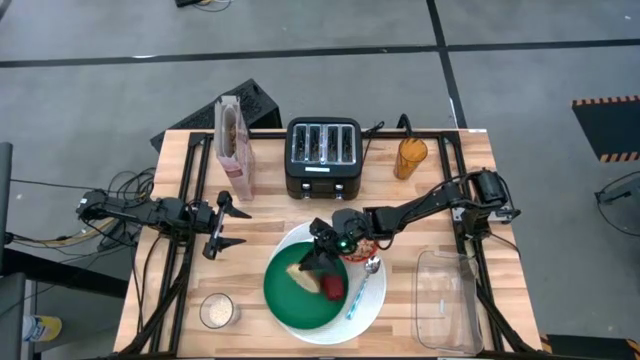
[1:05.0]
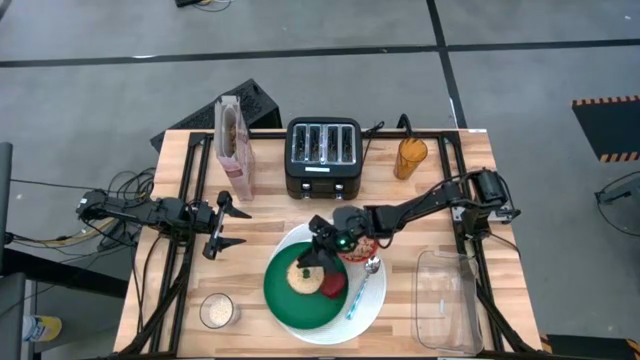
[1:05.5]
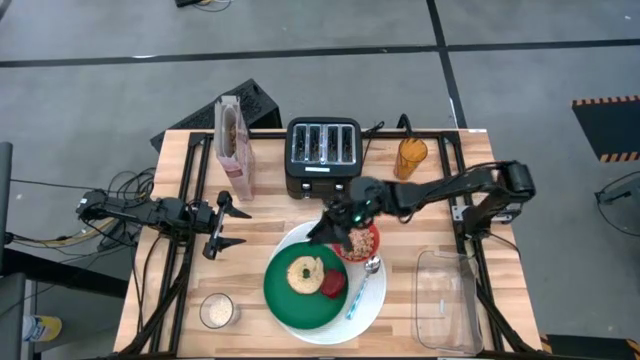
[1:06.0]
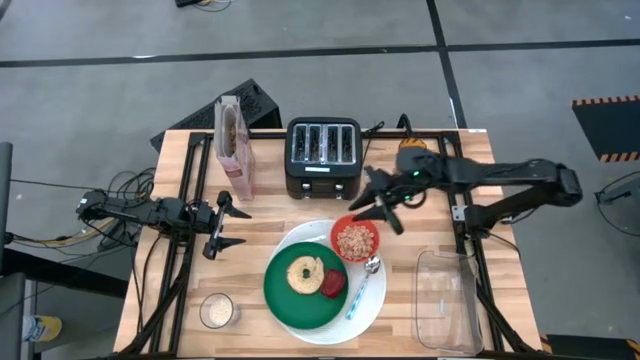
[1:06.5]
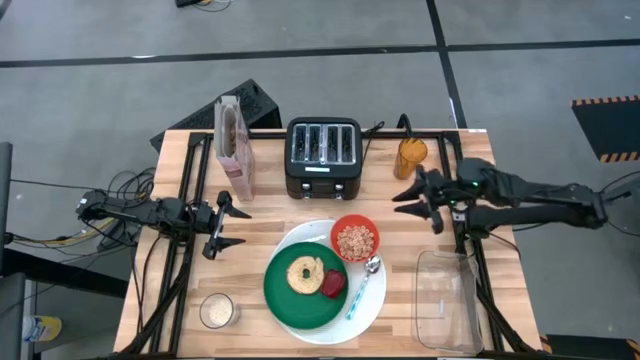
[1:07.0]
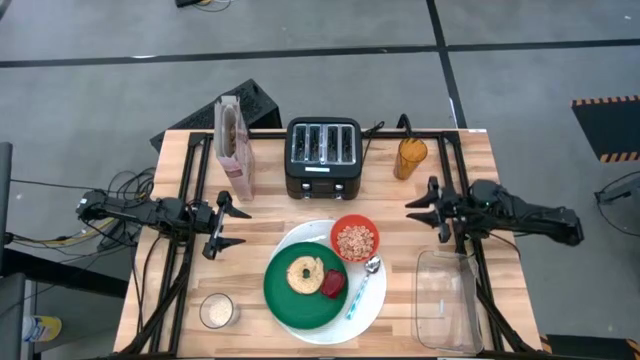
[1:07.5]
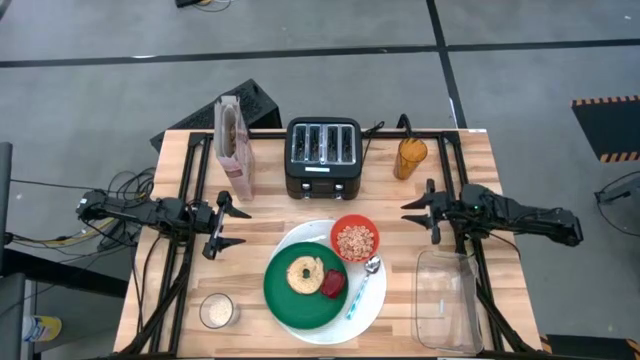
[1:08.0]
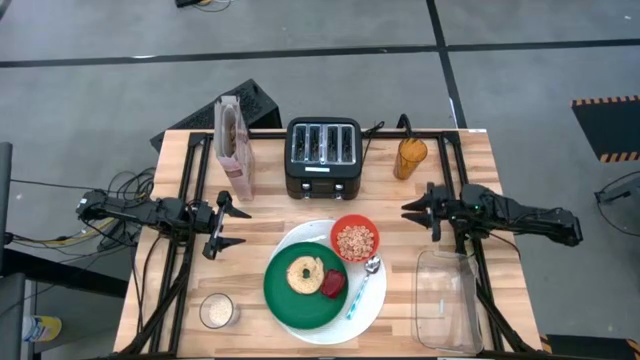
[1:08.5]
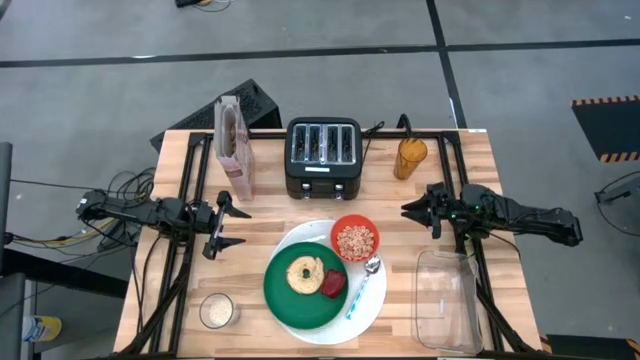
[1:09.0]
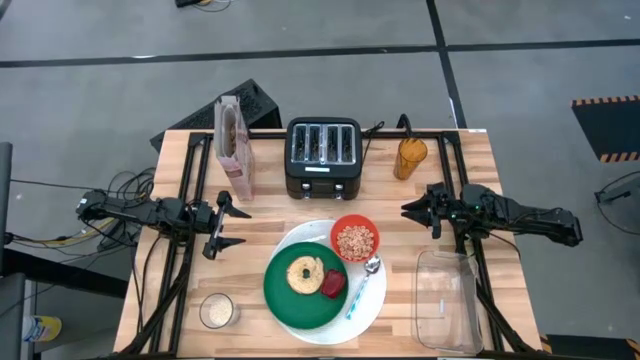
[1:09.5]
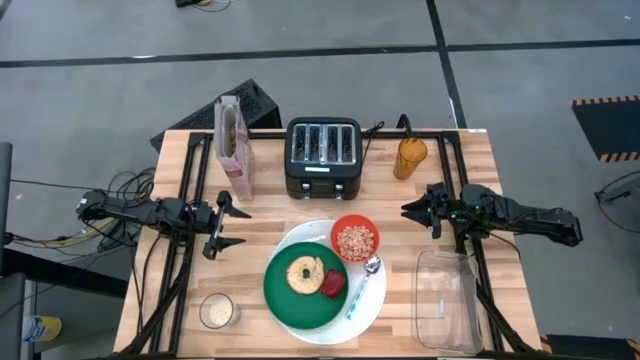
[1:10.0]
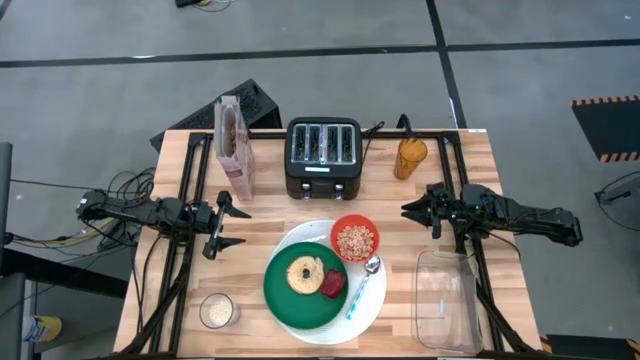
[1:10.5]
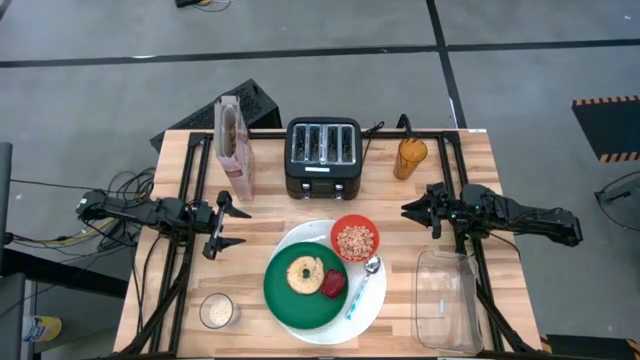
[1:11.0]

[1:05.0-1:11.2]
Task: Arrange a breakfast setting
Return to Home Position

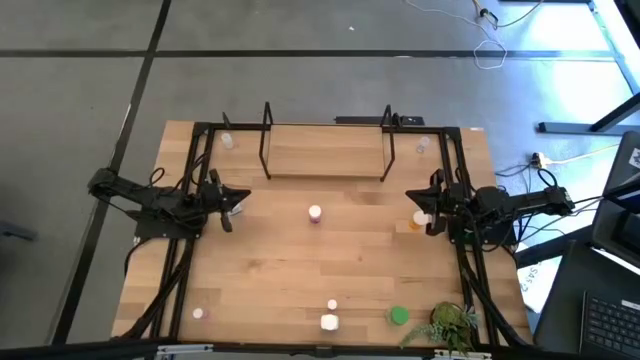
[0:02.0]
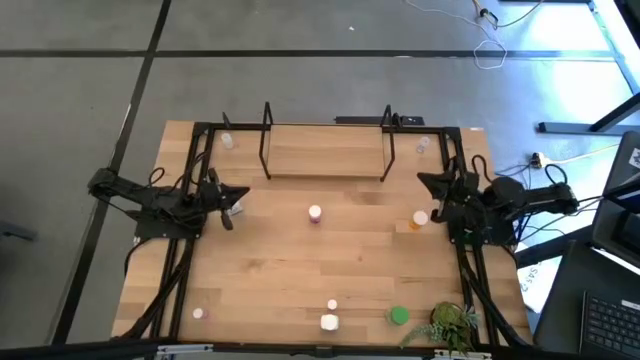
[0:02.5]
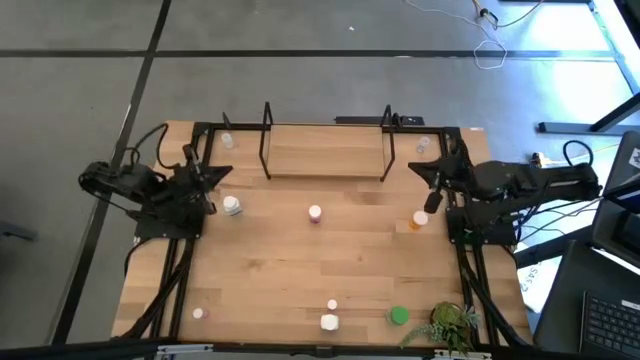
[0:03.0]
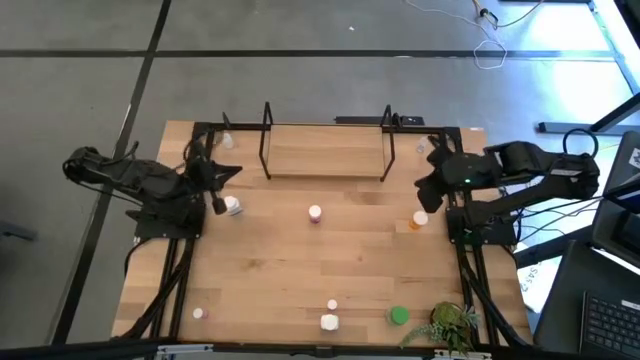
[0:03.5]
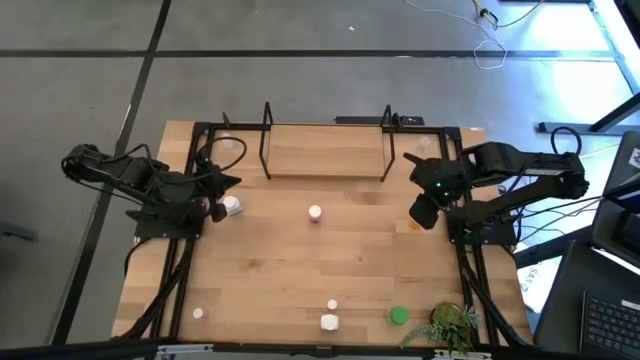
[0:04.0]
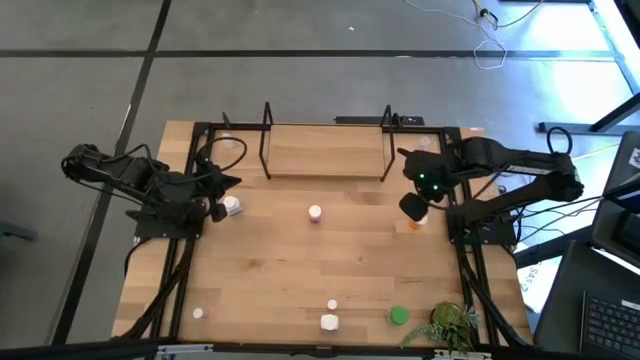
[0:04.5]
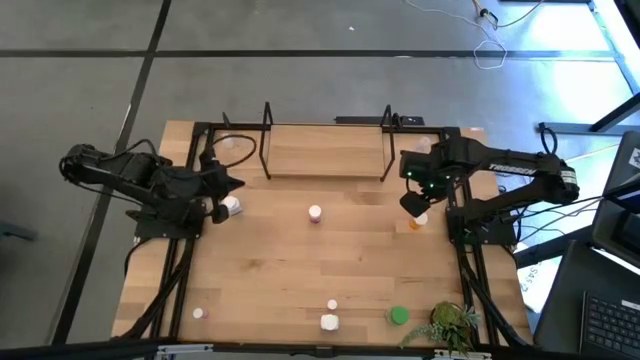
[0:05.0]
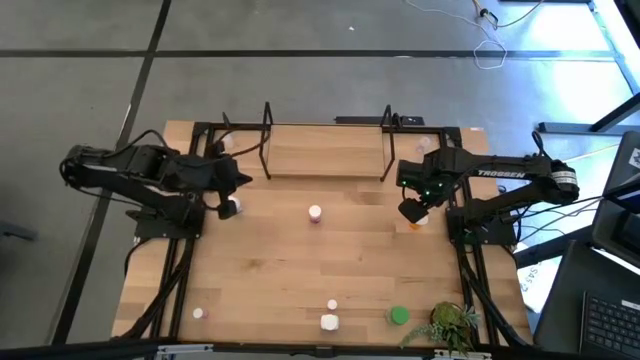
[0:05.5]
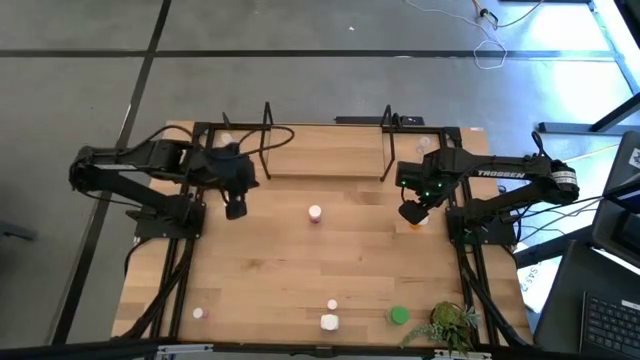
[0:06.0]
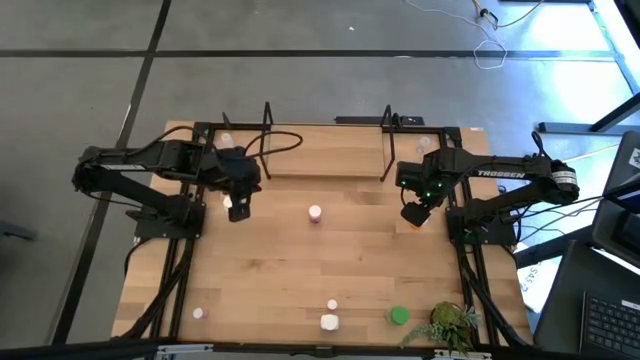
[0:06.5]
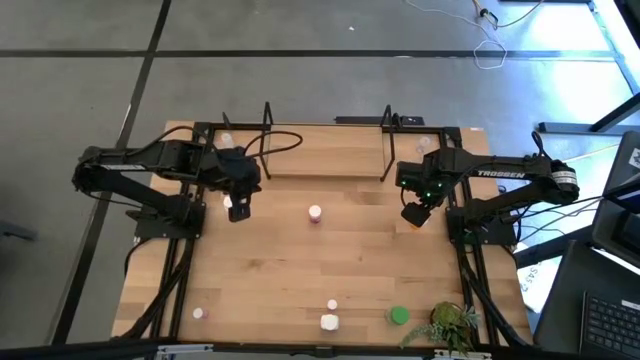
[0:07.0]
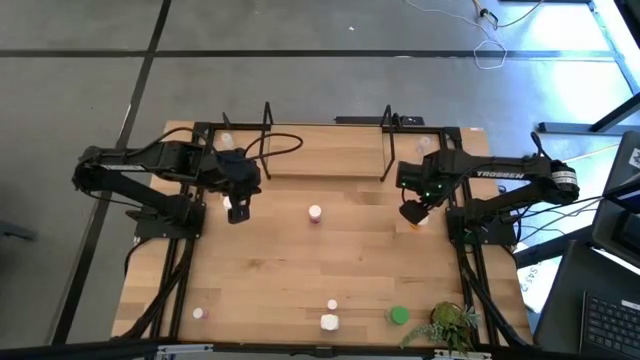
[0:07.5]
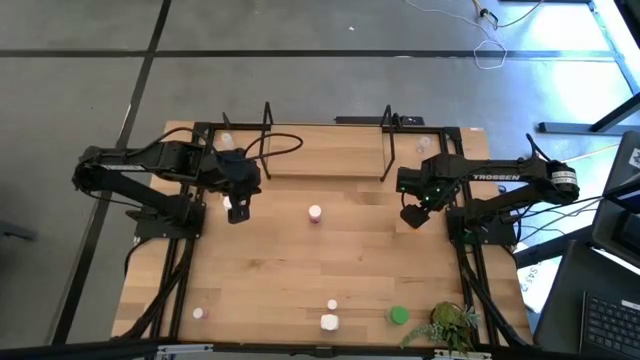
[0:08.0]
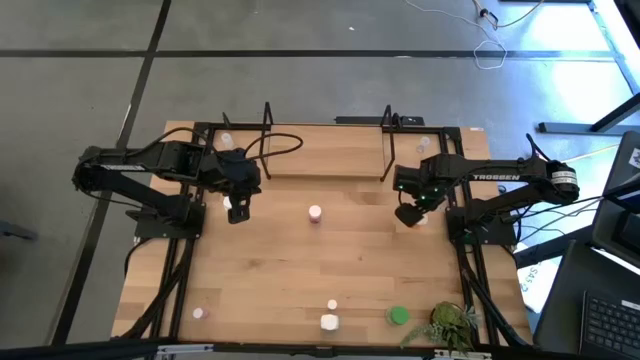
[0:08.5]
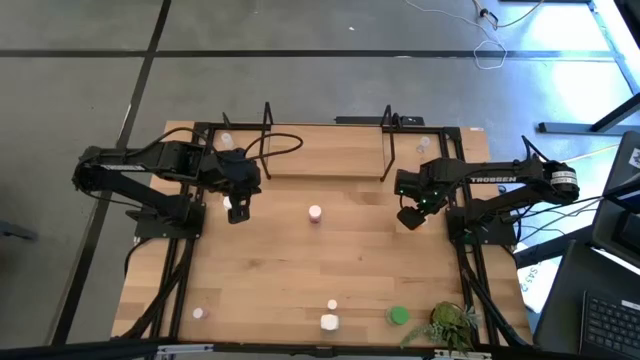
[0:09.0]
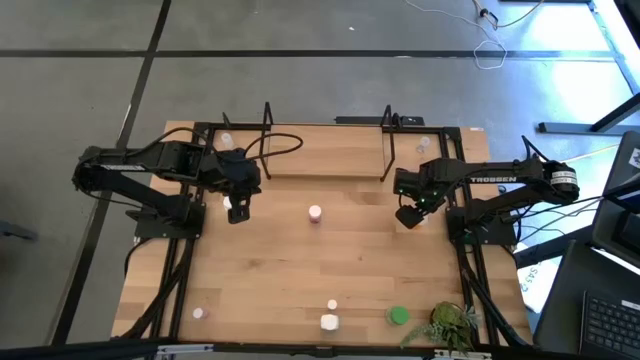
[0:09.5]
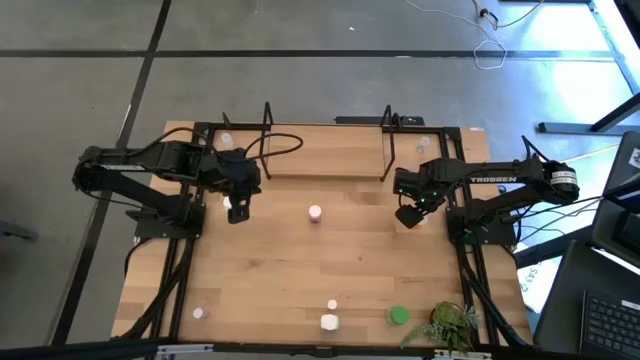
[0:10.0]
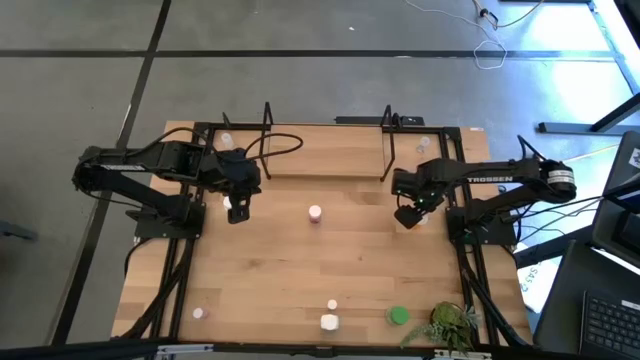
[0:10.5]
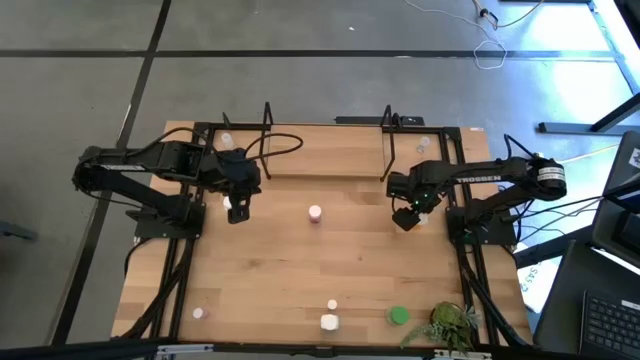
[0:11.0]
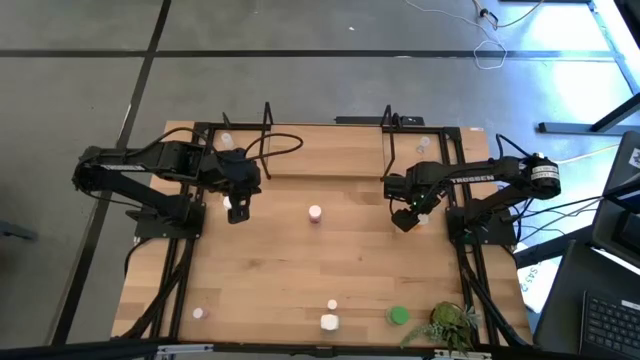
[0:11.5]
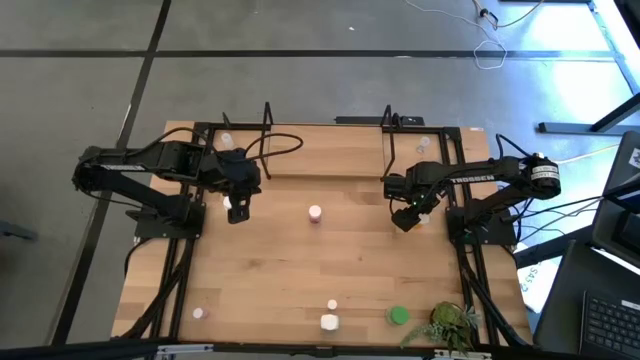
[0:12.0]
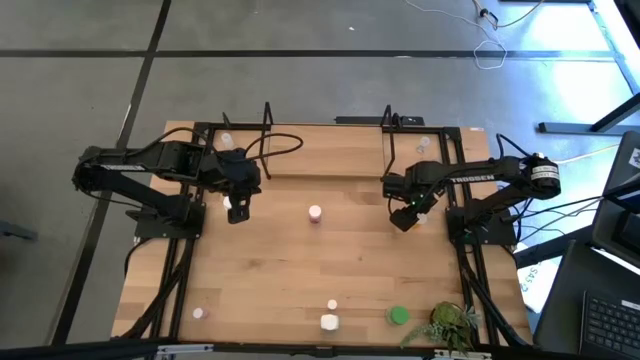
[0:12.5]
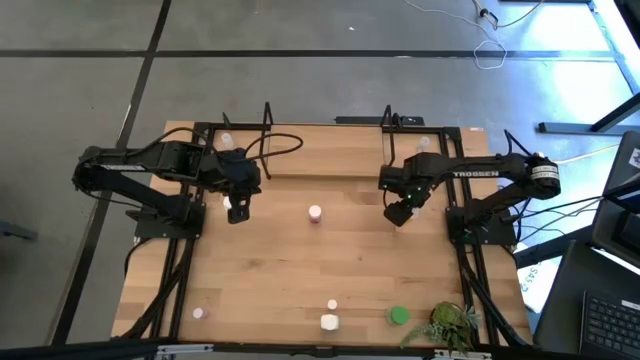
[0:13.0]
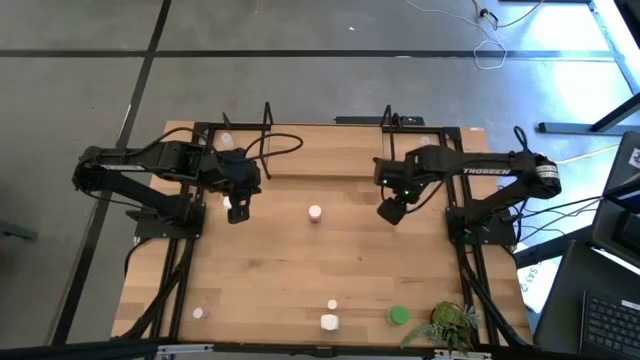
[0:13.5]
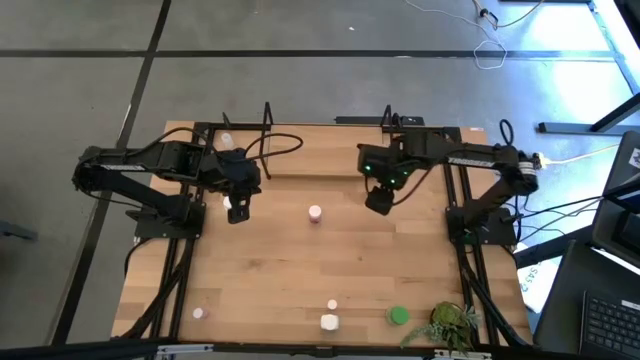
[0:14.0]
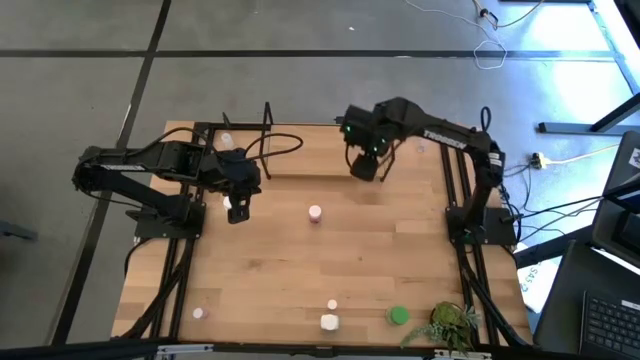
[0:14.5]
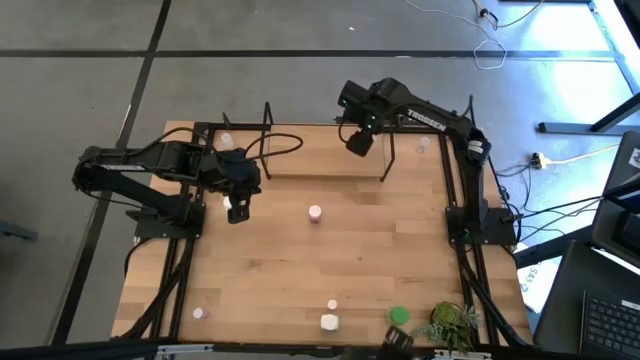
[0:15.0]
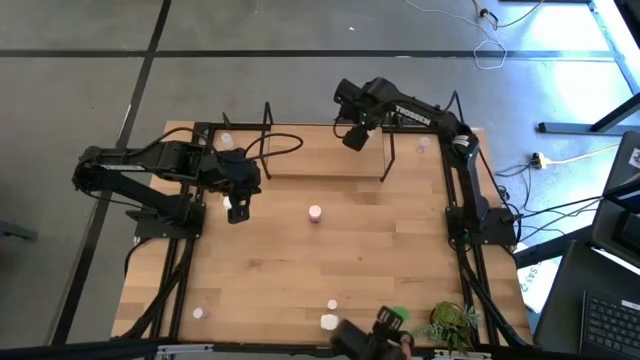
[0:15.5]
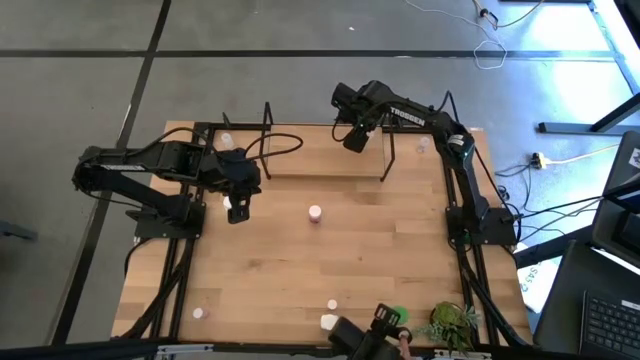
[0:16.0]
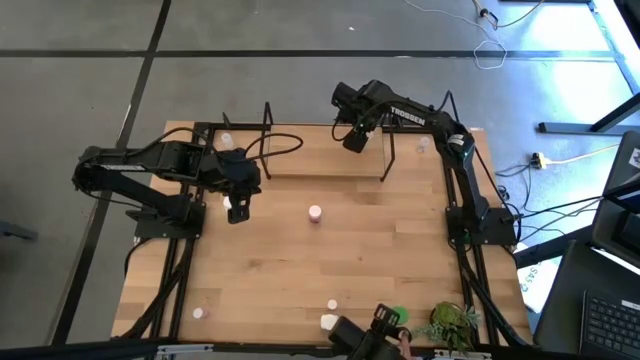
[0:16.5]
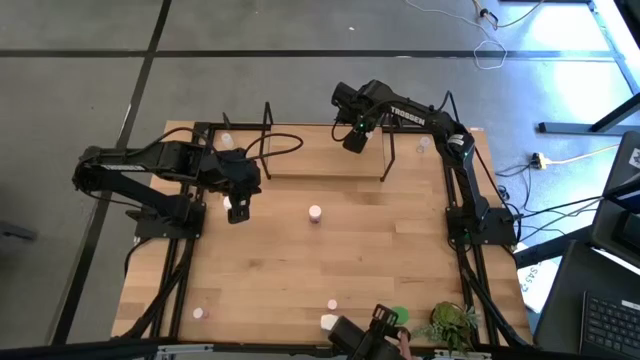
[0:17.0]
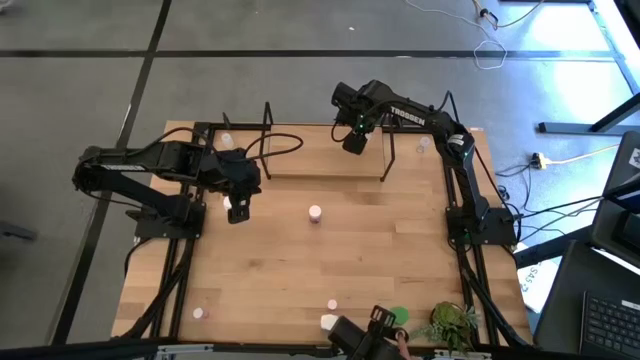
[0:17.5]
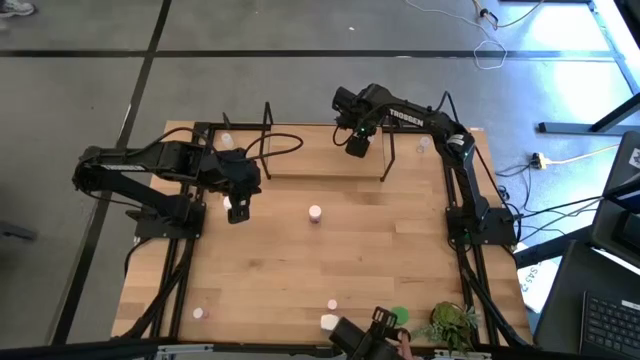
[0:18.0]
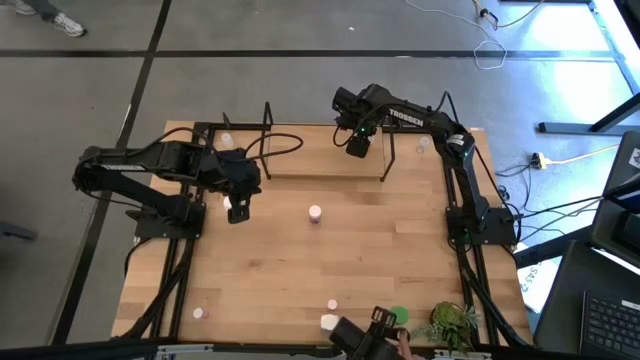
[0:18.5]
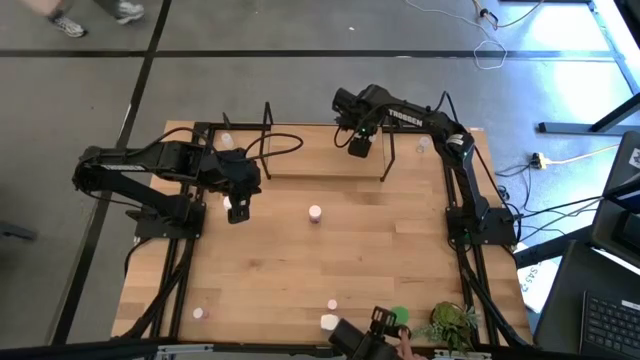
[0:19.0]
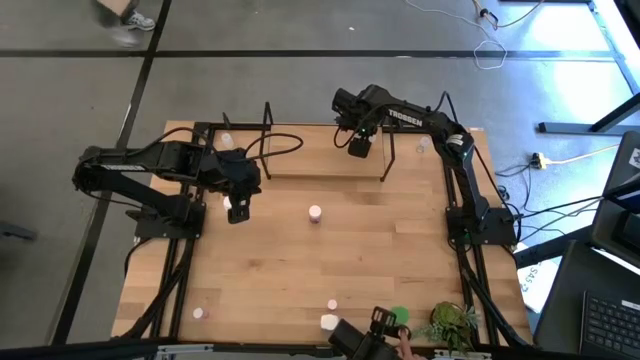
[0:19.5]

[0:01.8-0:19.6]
Task: Pick and place medicine bottles onto shelf by color
Put the orange pill bottle on the shelf
